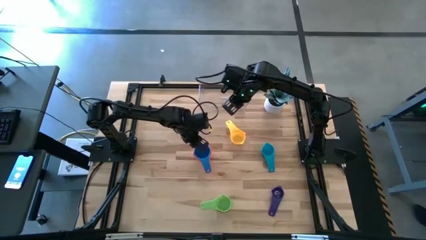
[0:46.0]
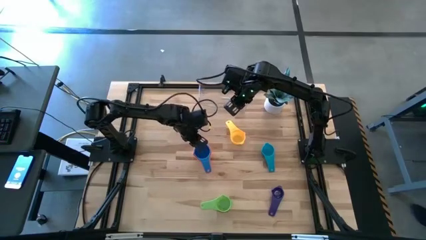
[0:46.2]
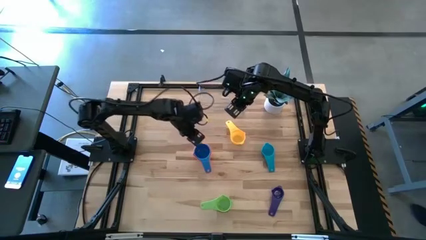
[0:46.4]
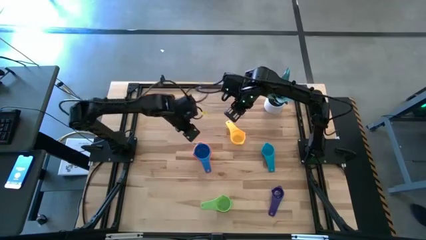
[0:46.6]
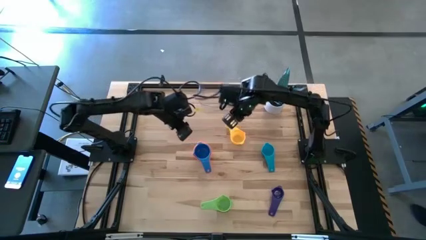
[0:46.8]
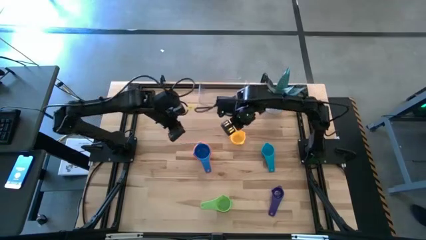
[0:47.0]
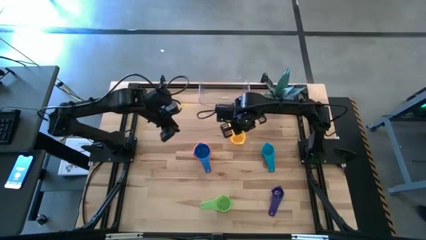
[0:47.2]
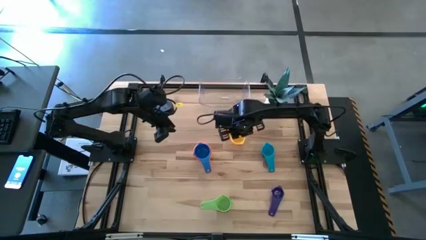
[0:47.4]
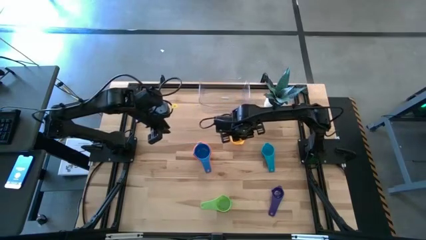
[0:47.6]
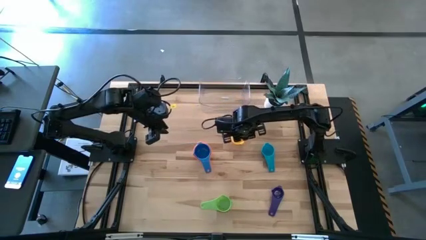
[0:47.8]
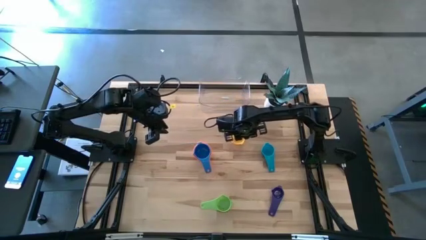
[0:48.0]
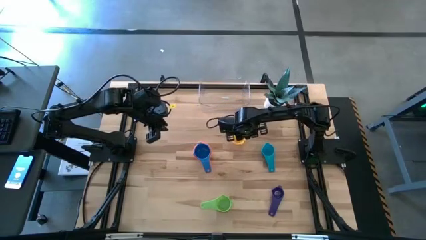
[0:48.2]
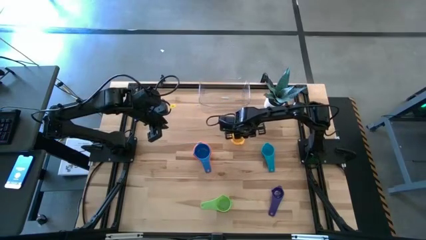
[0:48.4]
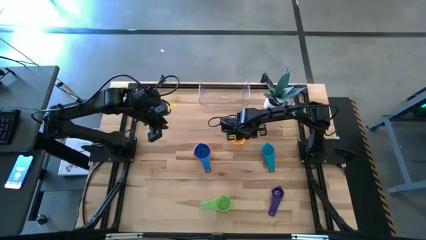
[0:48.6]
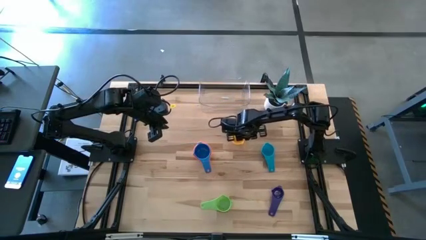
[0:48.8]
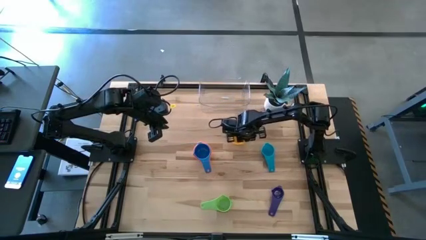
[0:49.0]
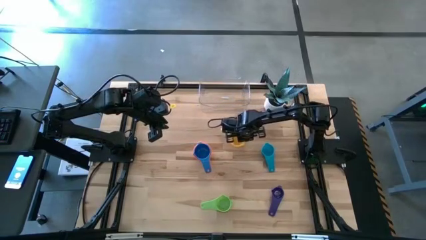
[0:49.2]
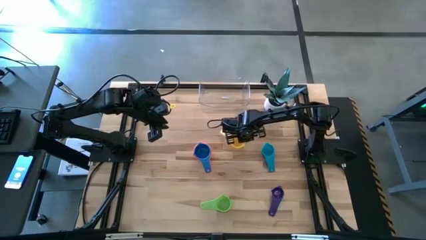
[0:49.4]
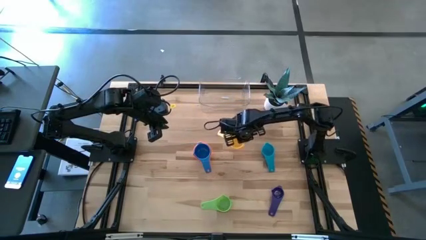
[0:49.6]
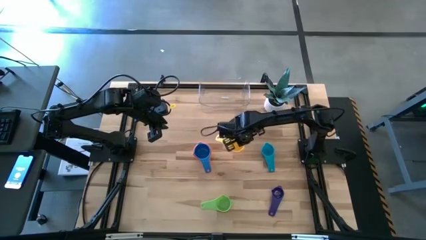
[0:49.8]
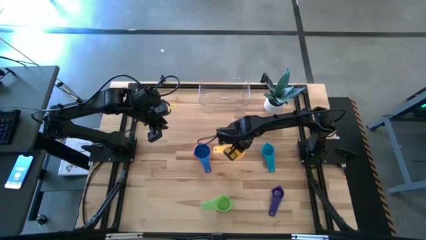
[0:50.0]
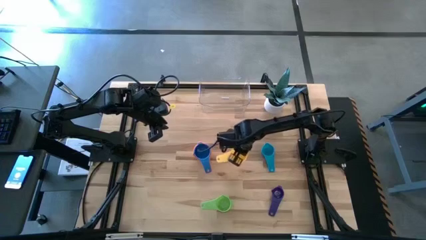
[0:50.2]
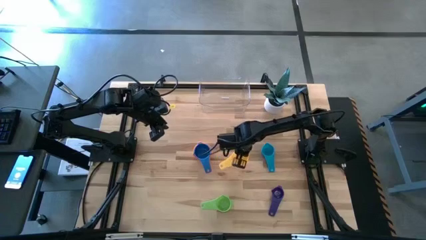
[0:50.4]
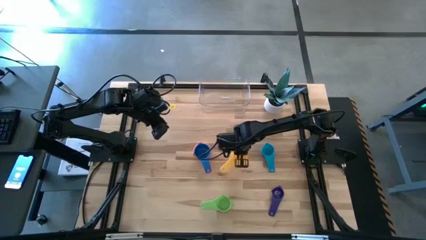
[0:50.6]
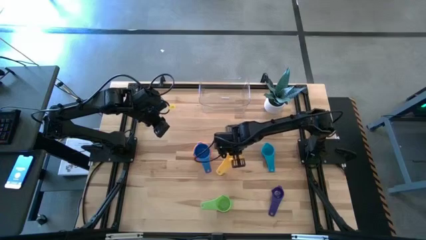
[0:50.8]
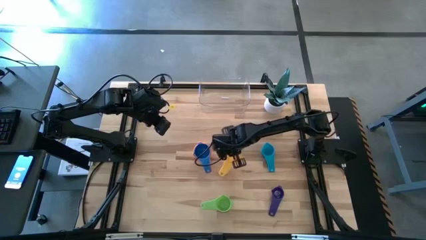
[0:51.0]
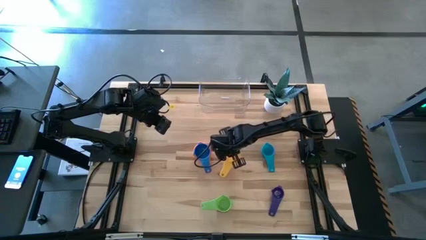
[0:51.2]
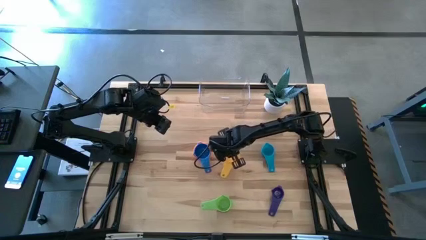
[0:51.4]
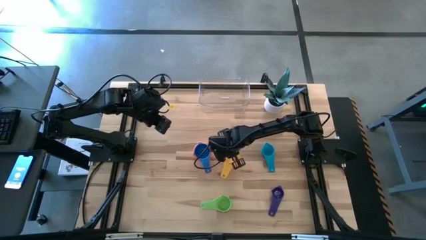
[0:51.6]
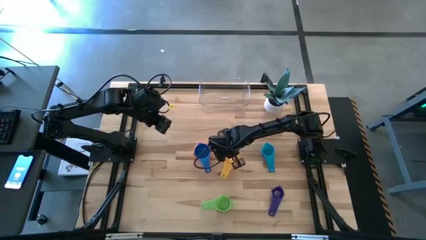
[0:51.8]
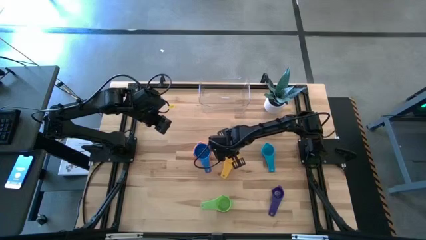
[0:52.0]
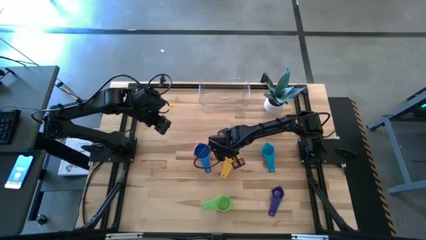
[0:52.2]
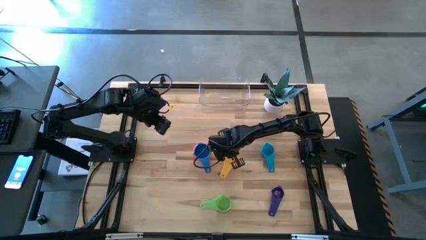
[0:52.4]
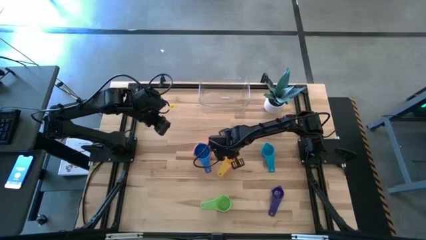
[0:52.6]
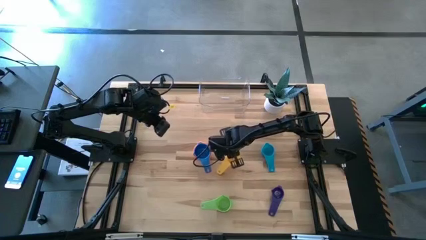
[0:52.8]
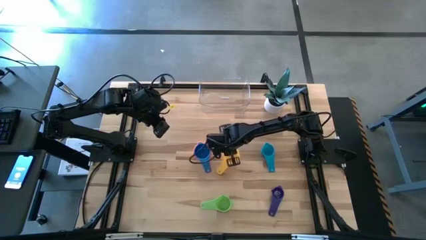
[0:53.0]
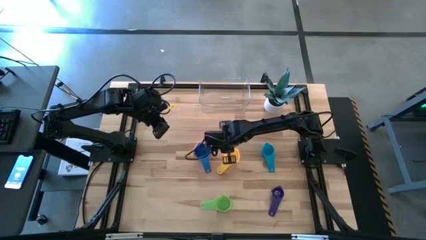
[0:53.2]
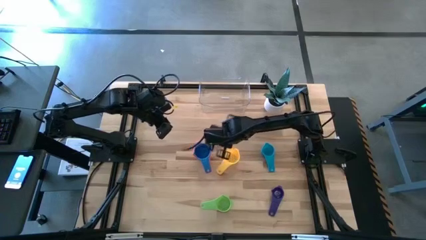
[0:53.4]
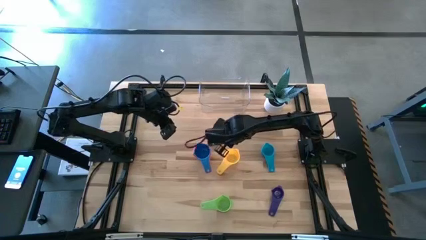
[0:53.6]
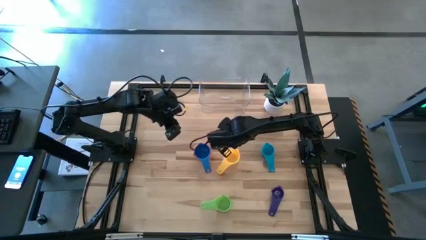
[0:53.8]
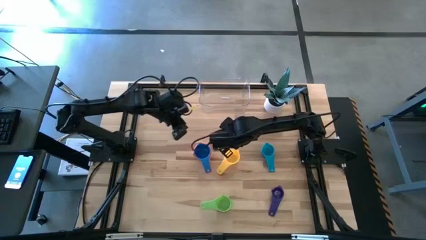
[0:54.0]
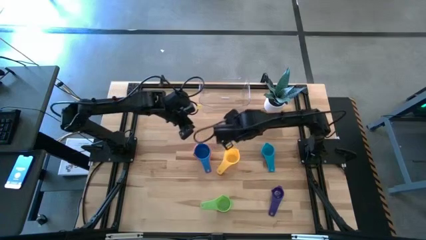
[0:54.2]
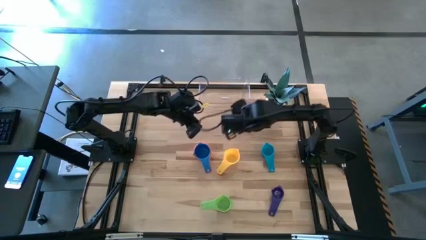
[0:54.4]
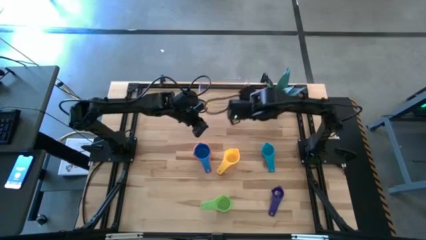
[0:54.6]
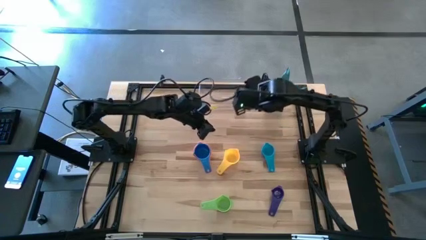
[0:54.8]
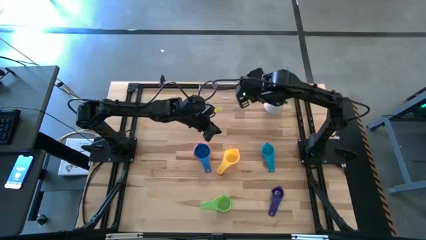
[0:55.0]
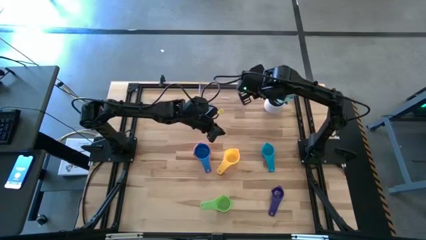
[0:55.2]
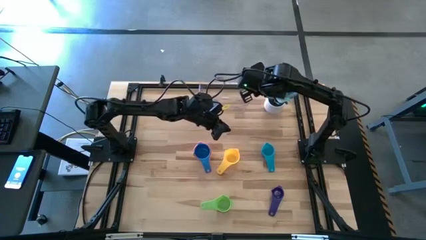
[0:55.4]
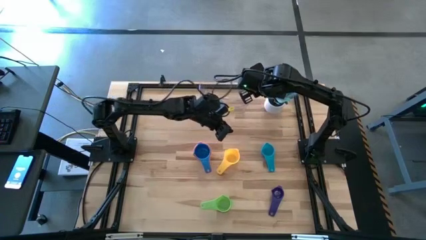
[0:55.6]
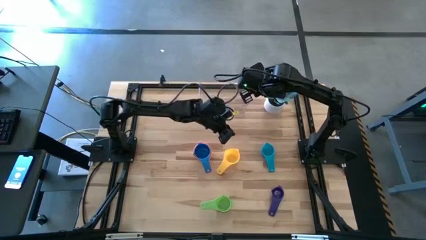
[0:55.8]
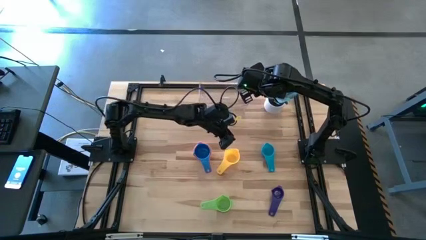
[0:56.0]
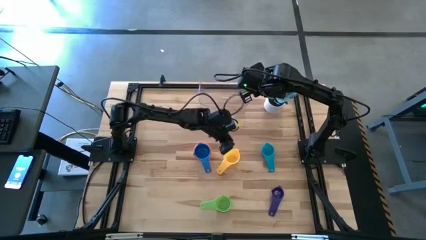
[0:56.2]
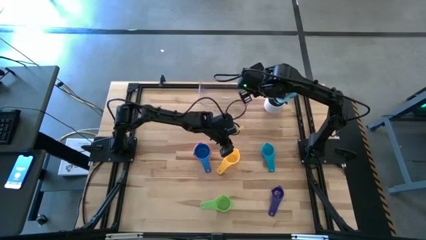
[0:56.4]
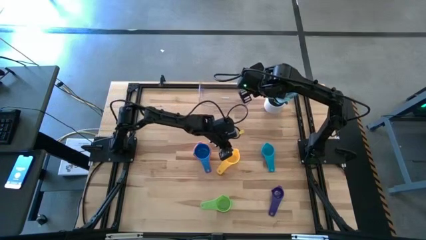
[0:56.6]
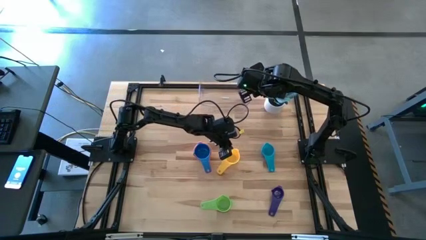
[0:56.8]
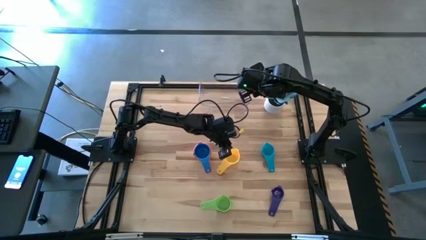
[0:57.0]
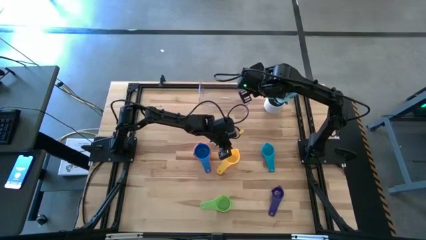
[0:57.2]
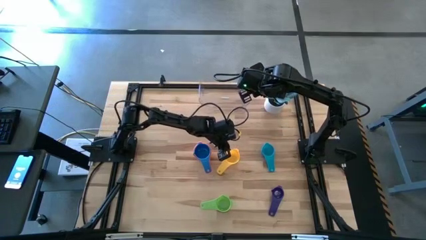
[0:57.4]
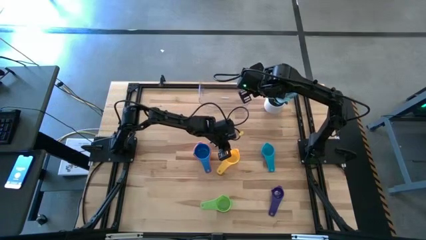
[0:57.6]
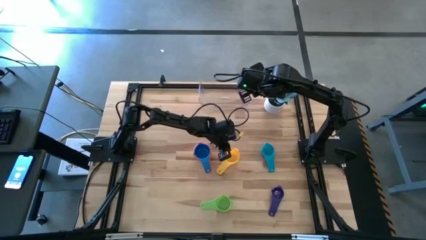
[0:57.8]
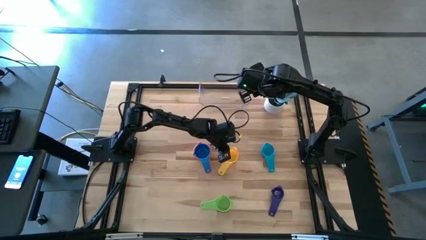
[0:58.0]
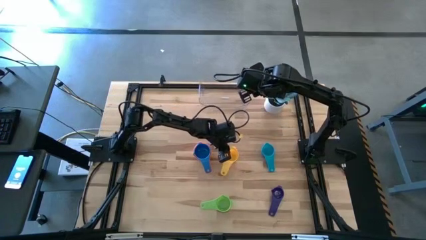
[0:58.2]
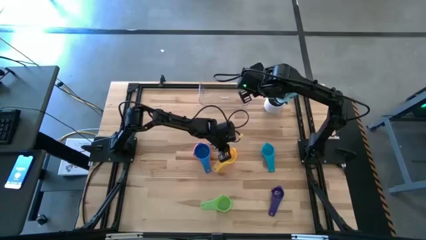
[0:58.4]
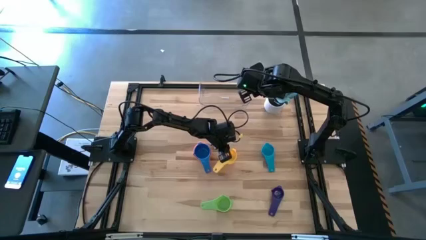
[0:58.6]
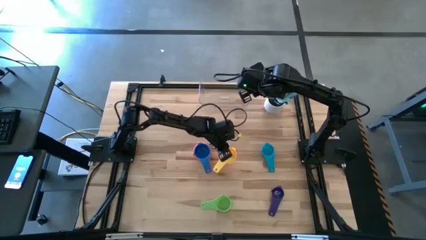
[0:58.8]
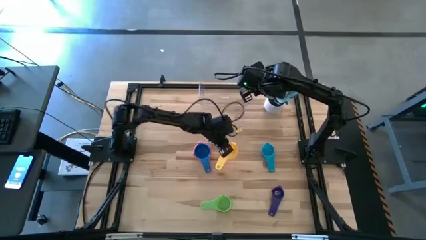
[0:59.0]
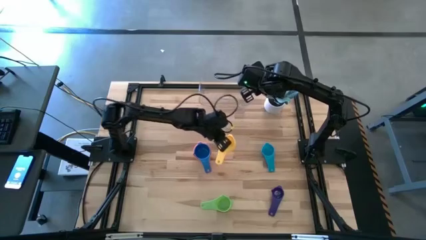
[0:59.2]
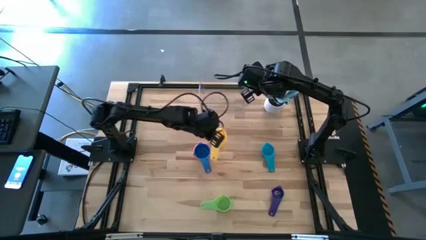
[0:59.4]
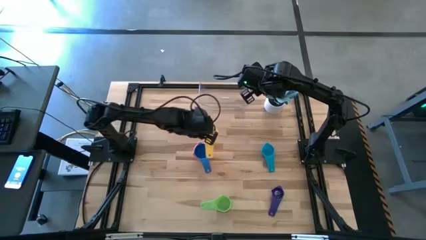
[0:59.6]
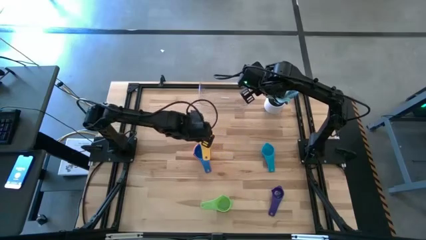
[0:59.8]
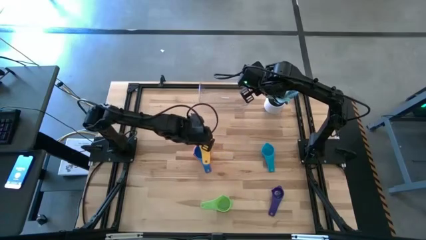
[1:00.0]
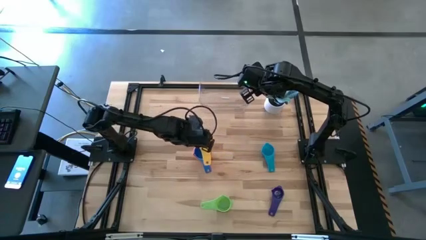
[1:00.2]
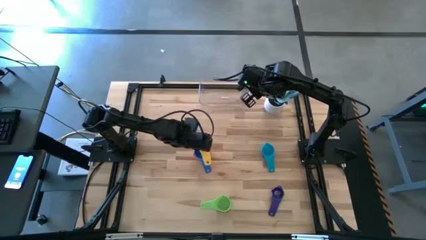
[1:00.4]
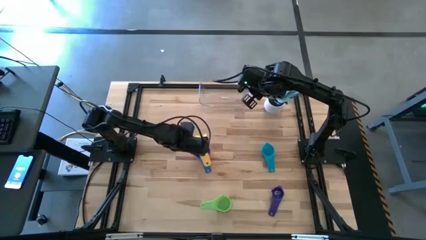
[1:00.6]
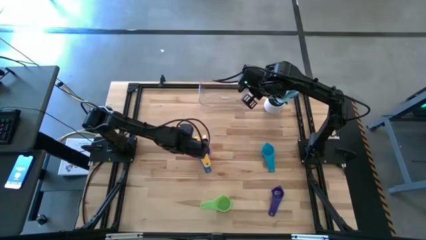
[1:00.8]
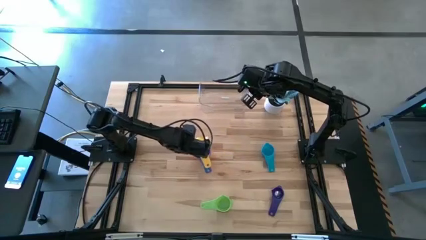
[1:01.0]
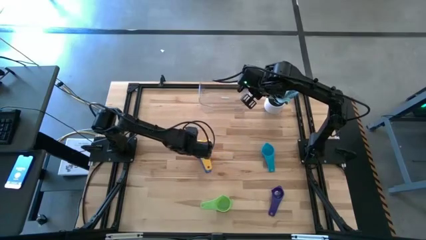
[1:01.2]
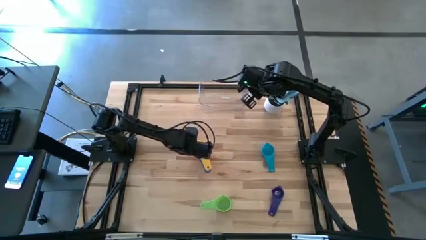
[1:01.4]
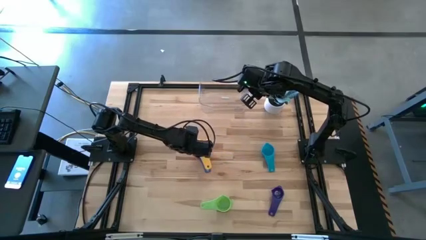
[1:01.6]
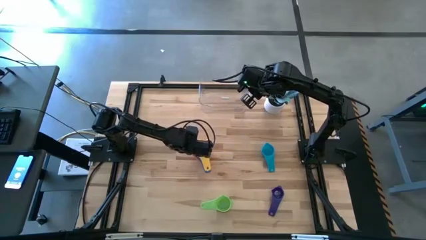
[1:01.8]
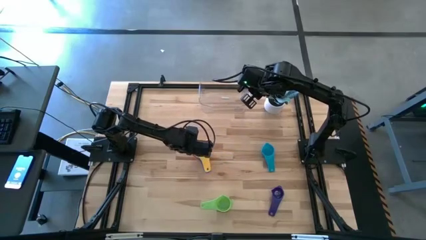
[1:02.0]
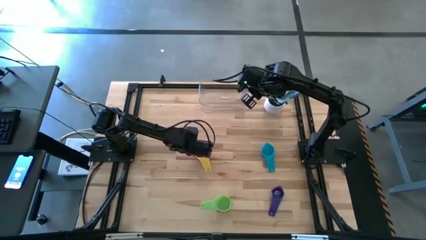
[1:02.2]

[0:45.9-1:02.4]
Task: Nest measuring cups in basket
Stack the yellow measuring cup on the top of the blue measuring cup

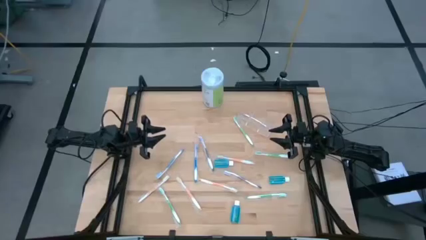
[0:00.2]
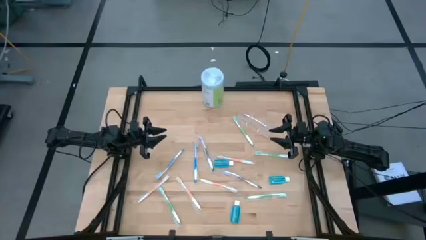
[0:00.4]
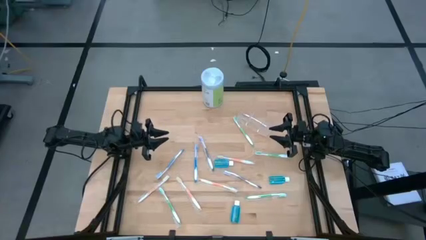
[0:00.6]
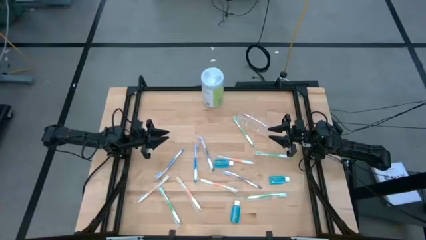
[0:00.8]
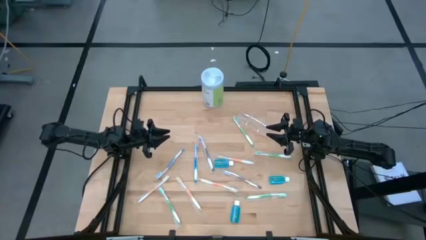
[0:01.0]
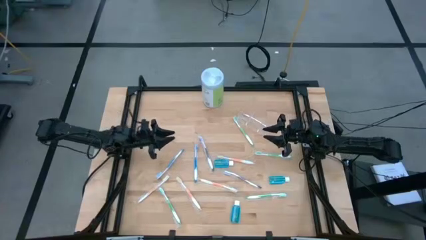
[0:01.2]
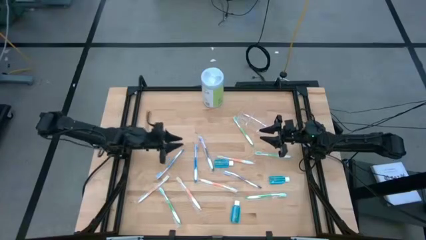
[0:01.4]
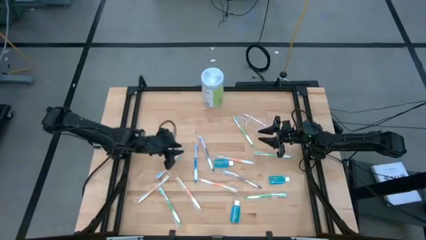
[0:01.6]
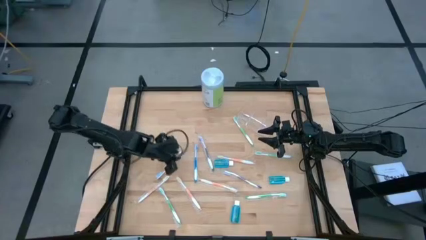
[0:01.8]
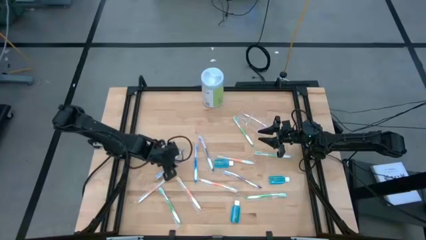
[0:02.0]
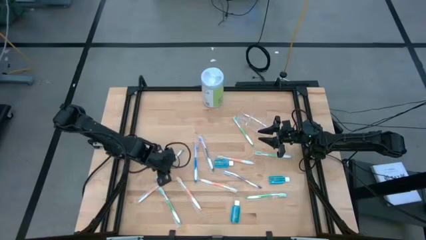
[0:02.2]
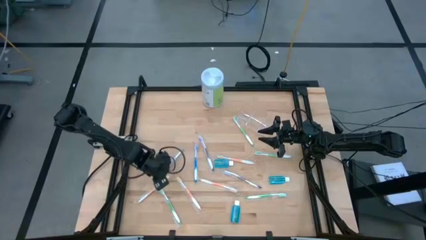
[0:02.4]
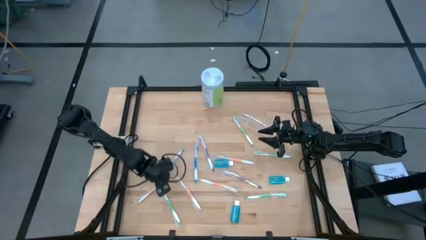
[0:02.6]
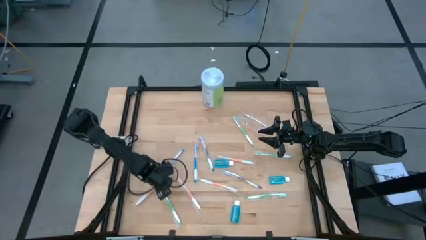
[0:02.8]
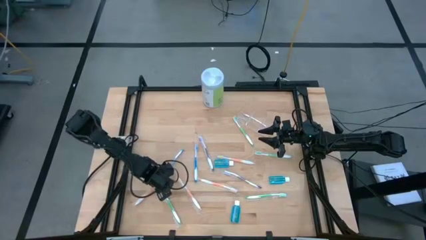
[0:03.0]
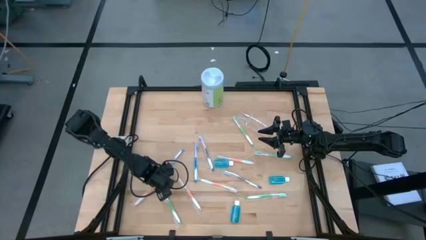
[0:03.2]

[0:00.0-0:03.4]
Task: Pick & Place toothbrushing station
Put the orange toothbrush into the transparent organizer
